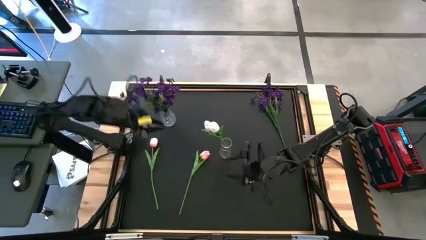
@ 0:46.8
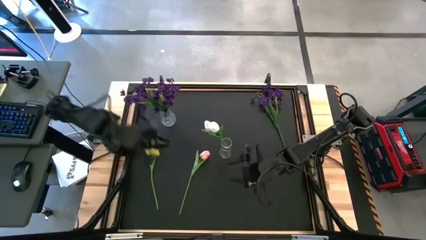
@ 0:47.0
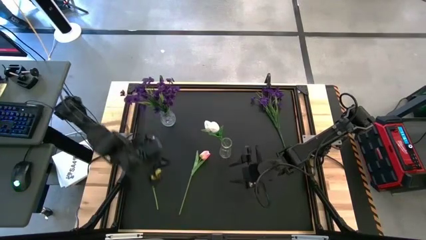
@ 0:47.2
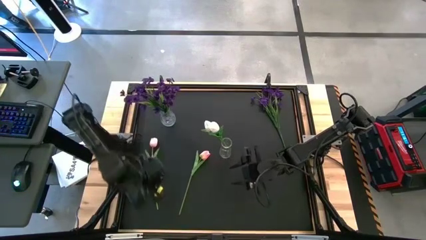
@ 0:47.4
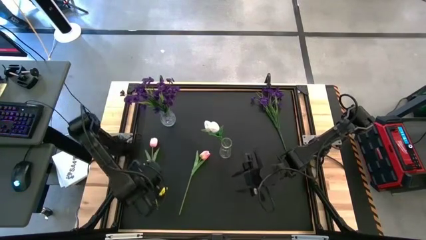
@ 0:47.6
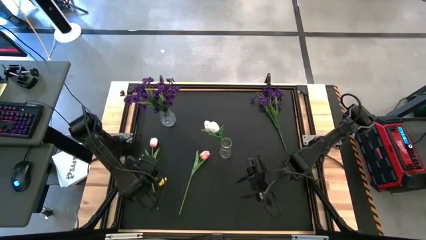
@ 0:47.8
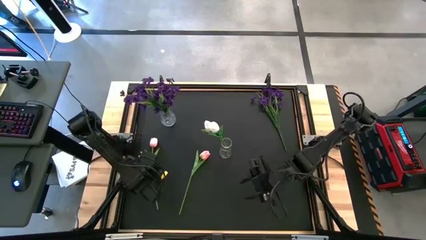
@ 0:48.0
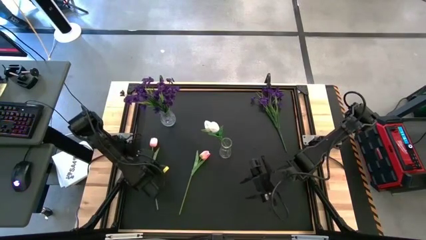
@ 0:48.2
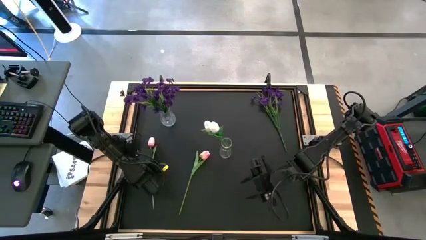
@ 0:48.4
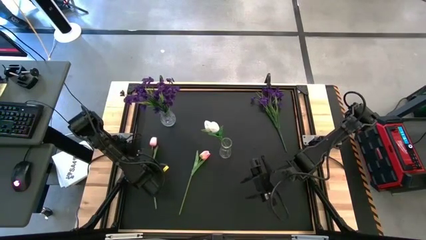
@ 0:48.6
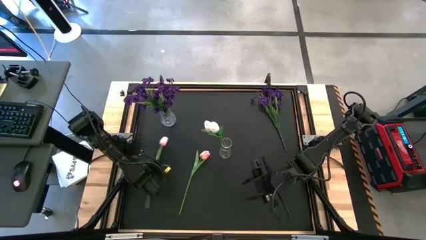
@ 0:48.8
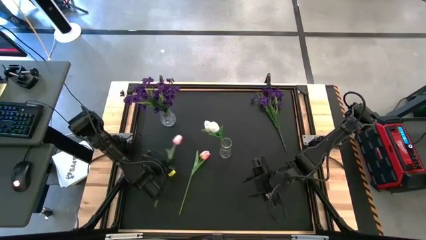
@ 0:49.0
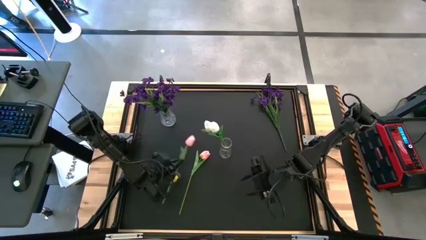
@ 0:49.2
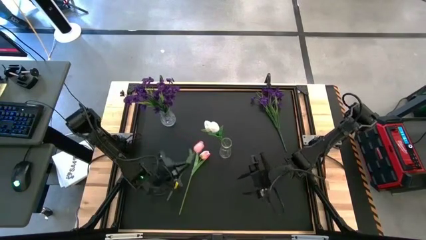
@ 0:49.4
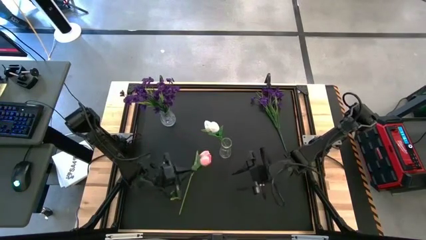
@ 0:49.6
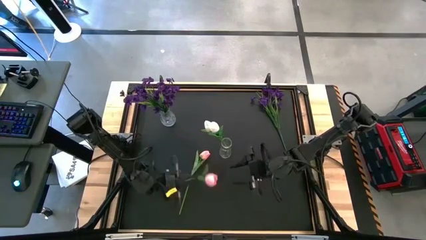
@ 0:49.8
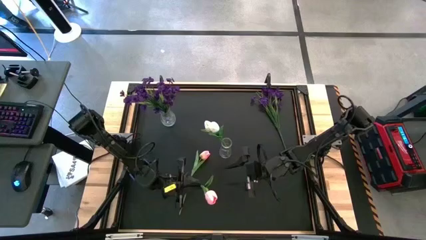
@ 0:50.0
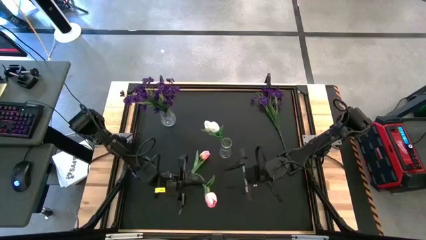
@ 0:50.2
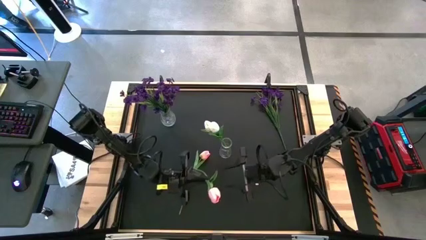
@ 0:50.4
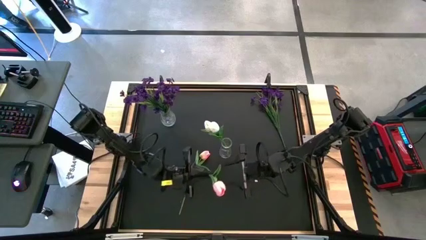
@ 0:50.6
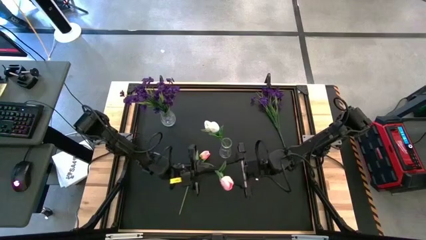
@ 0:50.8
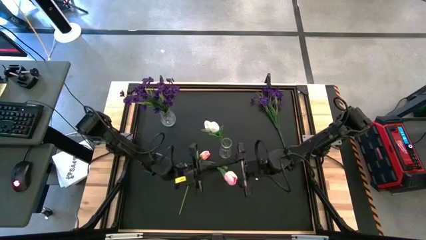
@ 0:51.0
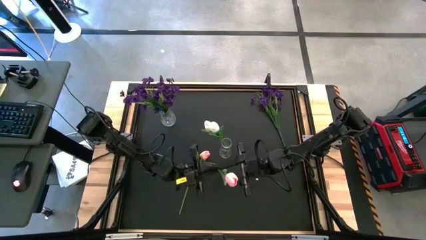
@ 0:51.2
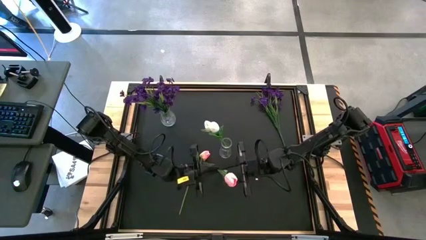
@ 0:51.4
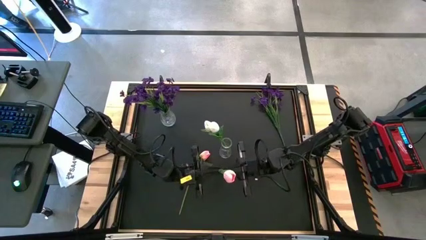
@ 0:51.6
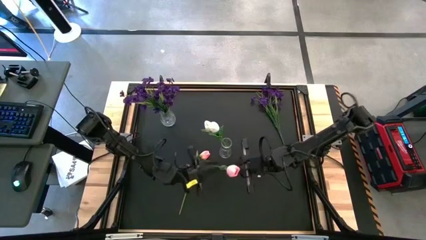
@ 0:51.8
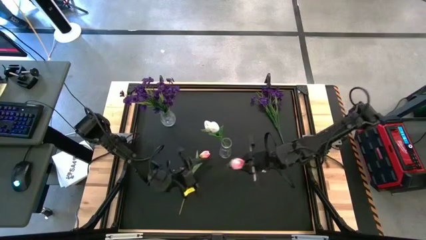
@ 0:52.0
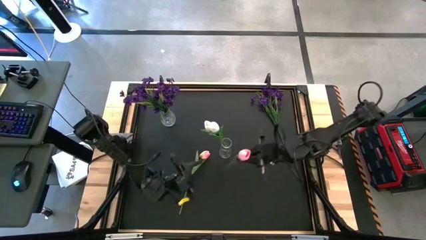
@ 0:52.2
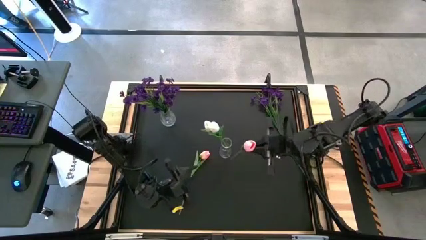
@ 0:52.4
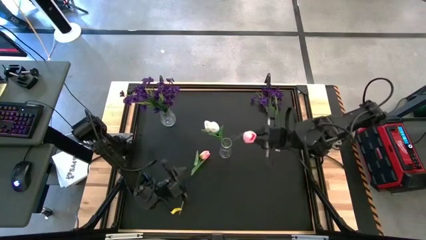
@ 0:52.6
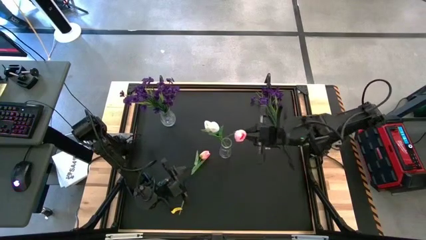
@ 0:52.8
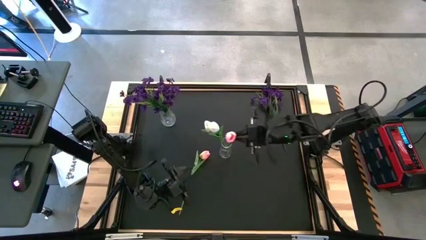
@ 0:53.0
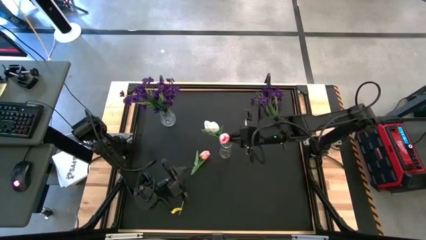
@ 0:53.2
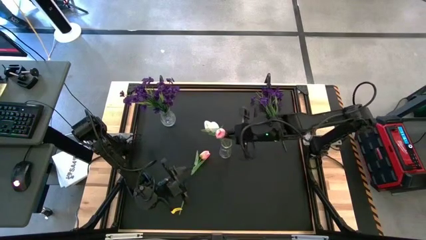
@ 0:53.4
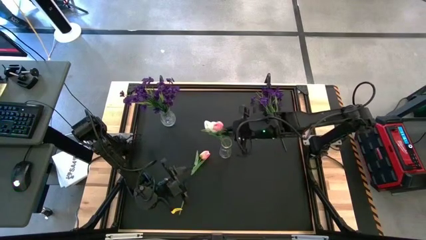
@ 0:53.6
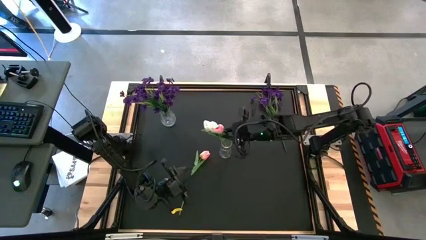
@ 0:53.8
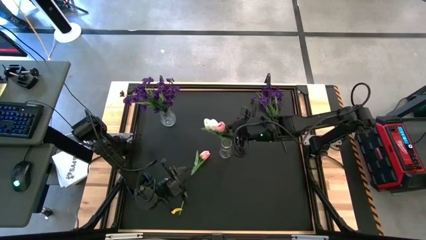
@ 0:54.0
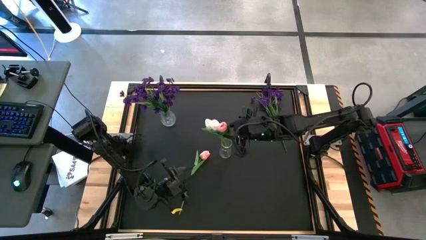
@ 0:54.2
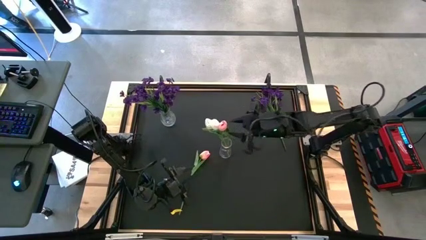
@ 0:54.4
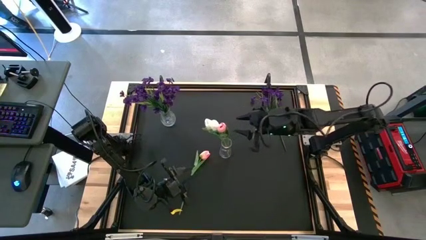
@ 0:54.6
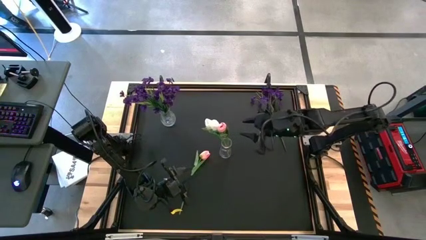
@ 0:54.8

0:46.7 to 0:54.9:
Task: Sort flowers into vase by color
Put the left pink tulip into the right transparent flower vase
